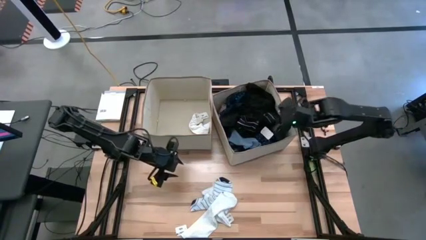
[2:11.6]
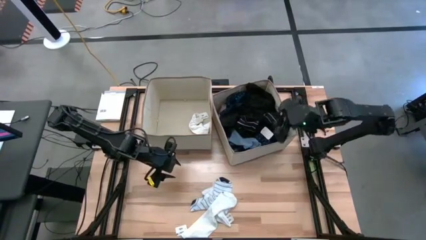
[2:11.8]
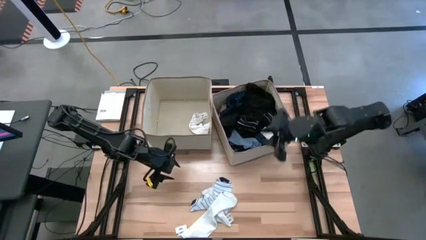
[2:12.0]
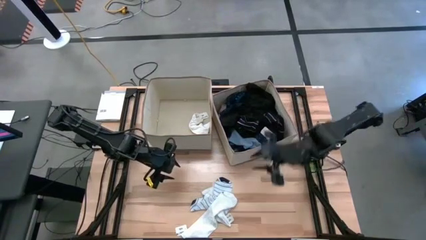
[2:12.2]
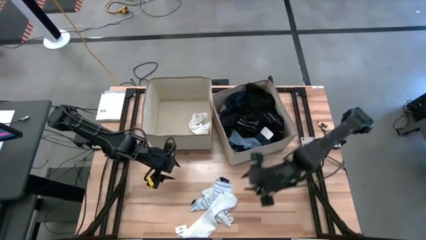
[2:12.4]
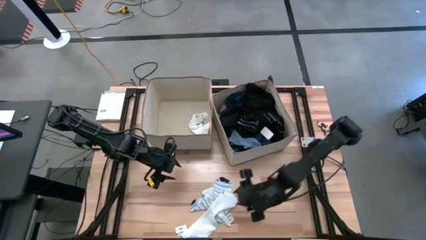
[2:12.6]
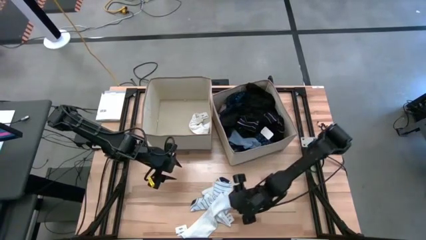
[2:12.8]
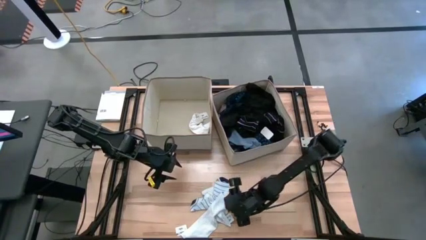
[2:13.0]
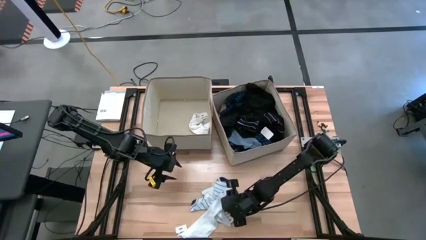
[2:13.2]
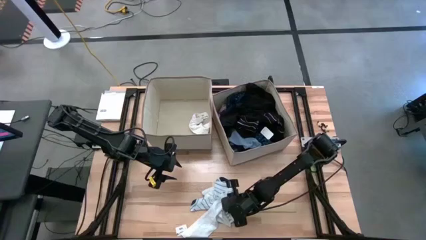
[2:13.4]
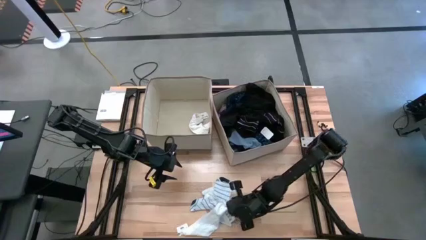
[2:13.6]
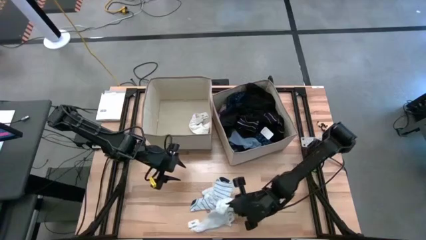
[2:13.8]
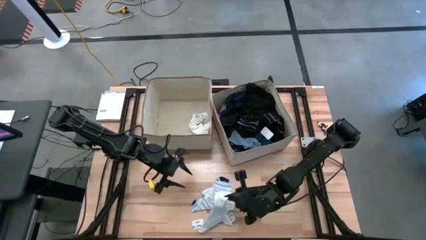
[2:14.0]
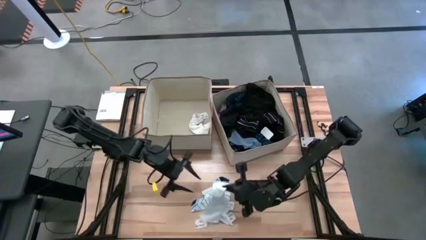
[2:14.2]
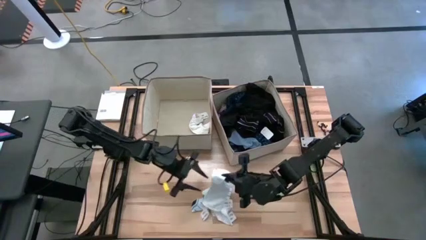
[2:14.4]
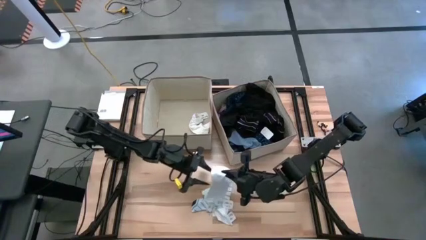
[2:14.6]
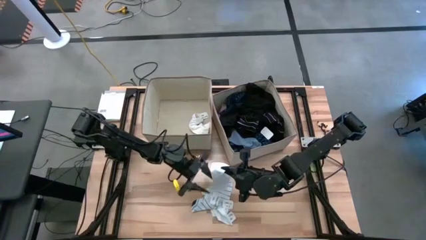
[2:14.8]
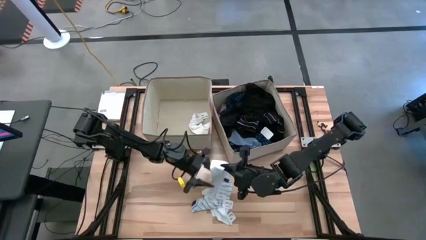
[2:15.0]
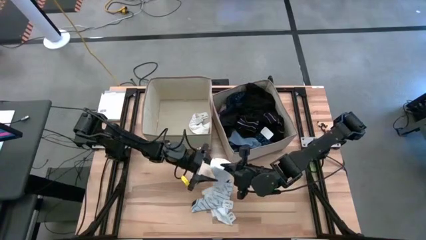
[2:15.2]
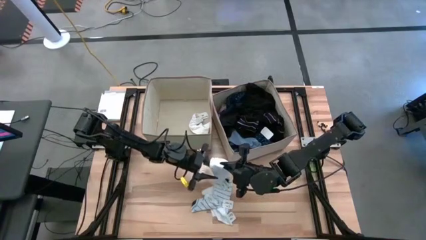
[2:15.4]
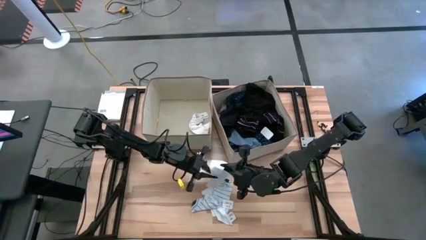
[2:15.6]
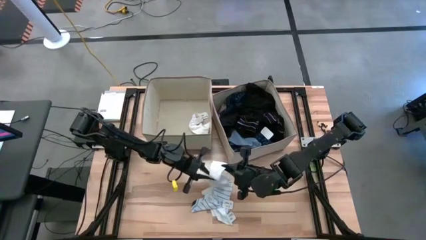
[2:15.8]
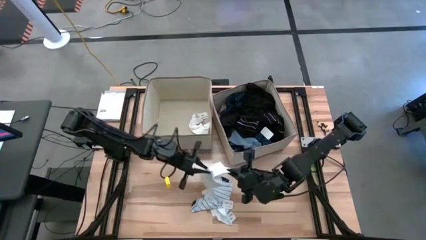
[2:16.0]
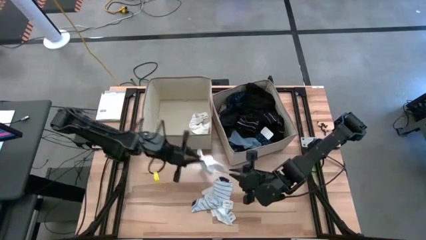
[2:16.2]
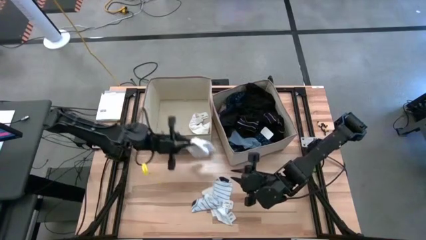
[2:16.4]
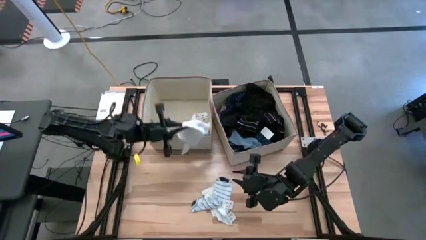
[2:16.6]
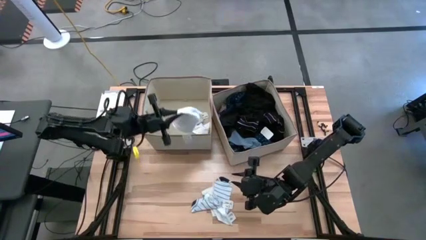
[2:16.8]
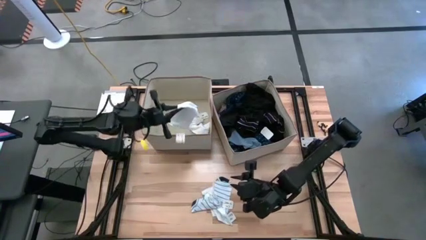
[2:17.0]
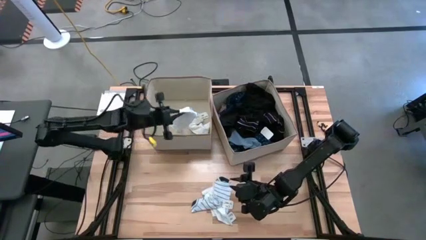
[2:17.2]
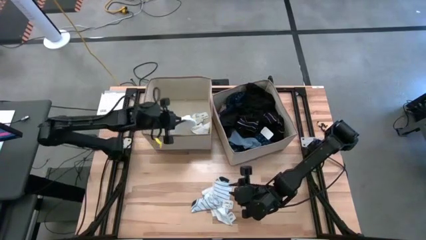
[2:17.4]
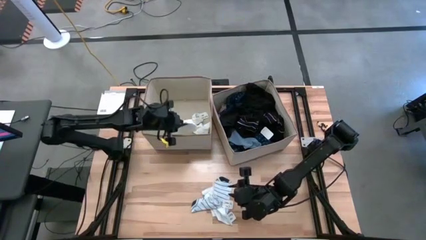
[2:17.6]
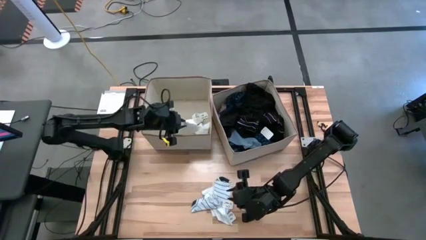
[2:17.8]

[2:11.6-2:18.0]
Task: Sort clothes
Put the top white sock into the left laundry organizer

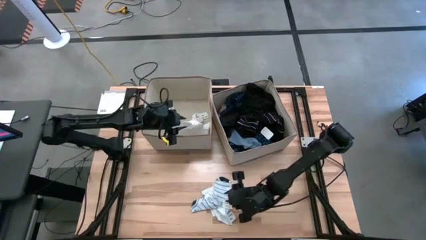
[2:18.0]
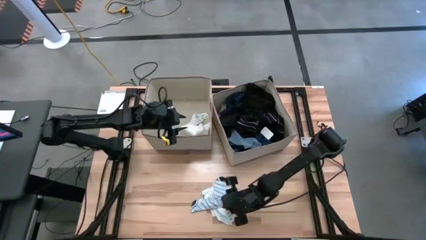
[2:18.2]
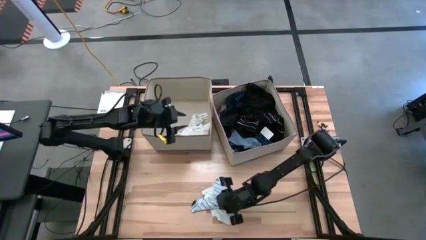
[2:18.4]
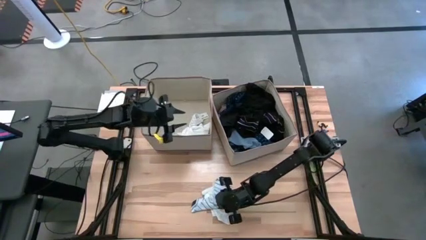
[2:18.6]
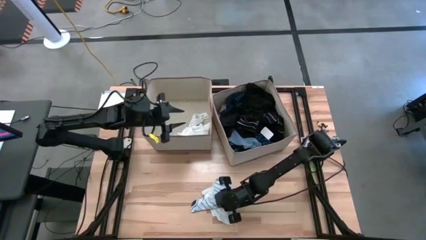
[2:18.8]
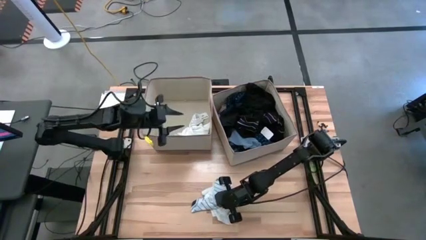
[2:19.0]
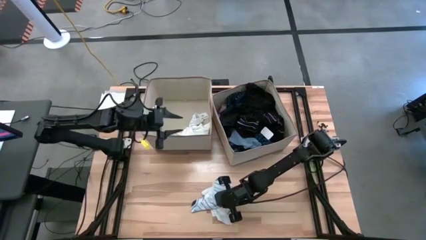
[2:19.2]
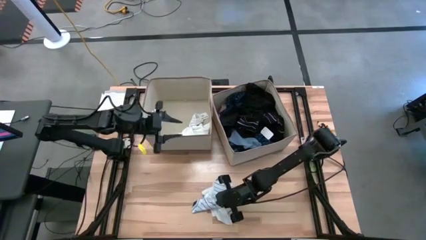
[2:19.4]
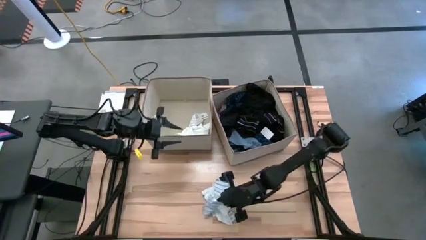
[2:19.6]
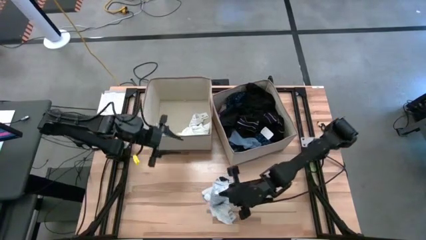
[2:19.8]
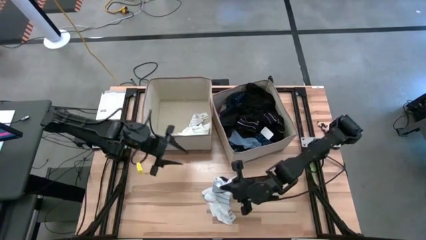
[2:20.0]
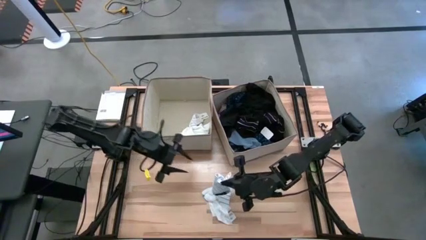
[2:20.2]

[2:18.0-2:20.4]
Put the right white and blue sock into the left laundry organizer

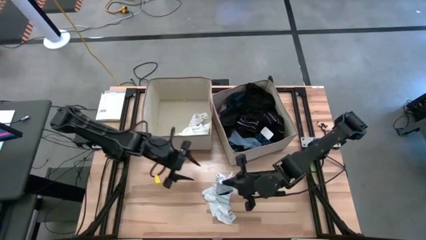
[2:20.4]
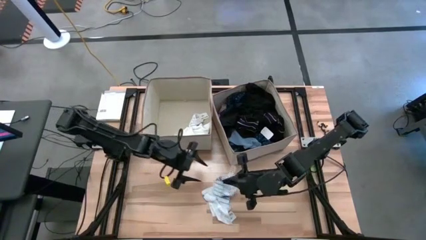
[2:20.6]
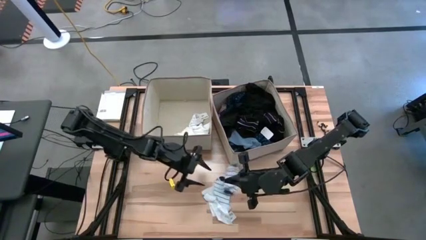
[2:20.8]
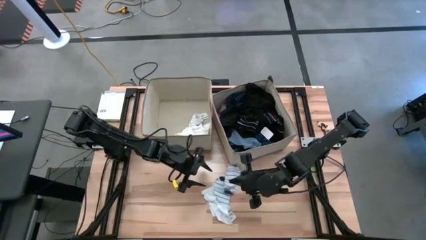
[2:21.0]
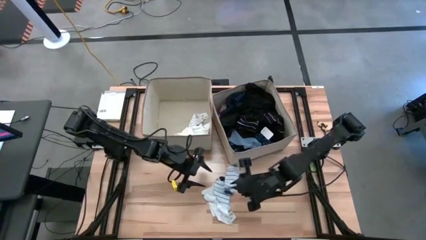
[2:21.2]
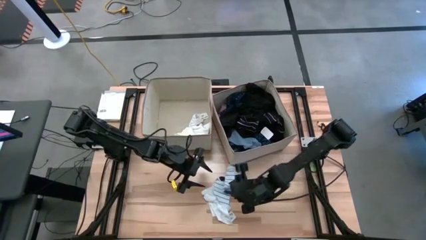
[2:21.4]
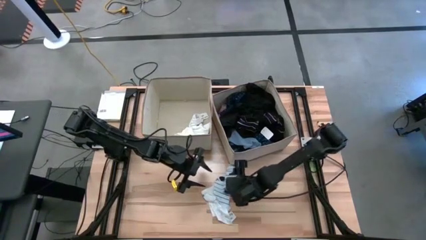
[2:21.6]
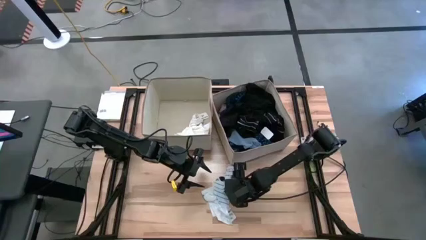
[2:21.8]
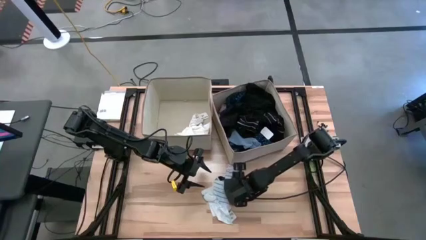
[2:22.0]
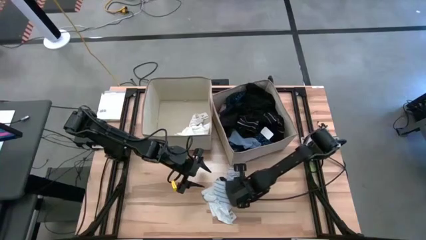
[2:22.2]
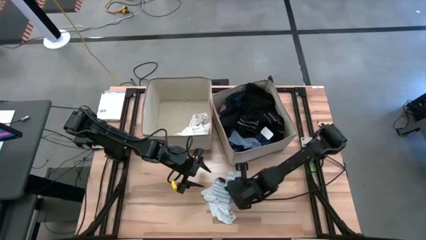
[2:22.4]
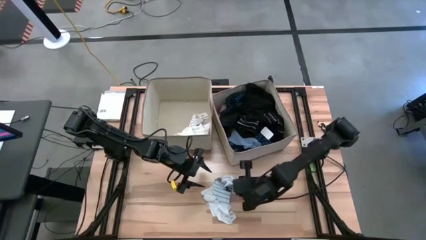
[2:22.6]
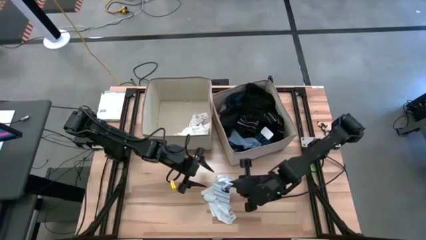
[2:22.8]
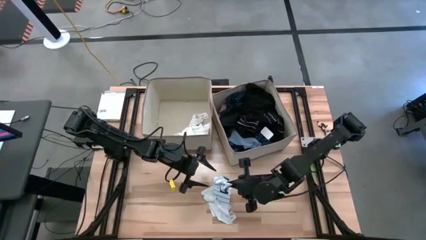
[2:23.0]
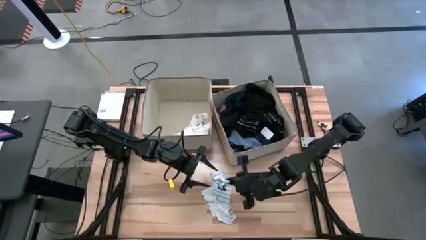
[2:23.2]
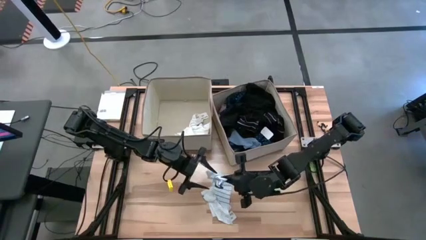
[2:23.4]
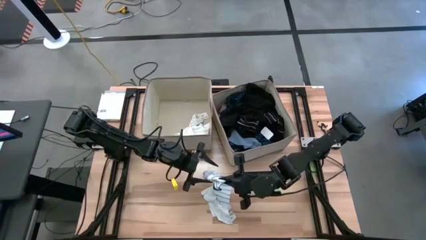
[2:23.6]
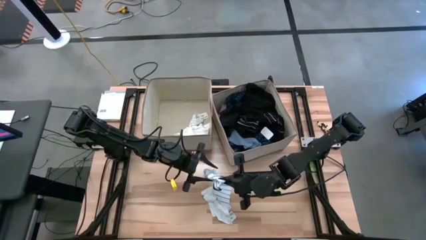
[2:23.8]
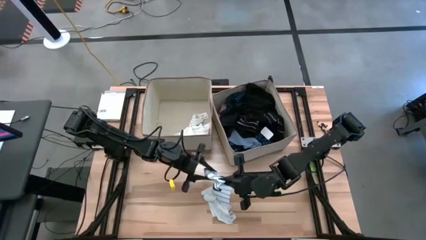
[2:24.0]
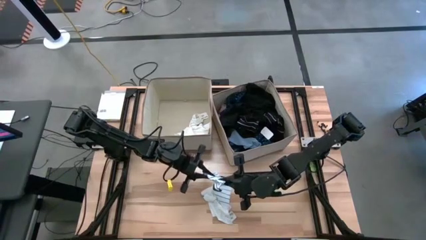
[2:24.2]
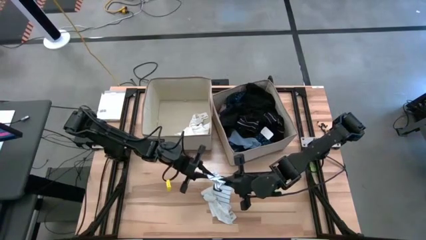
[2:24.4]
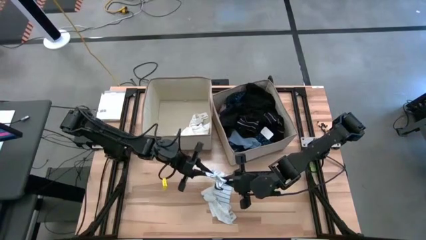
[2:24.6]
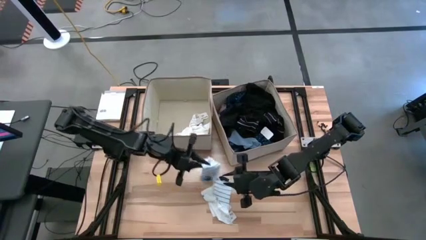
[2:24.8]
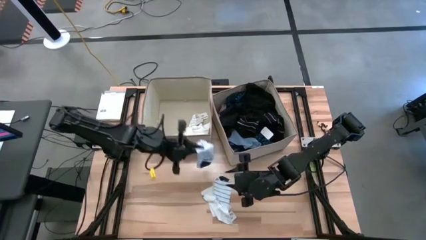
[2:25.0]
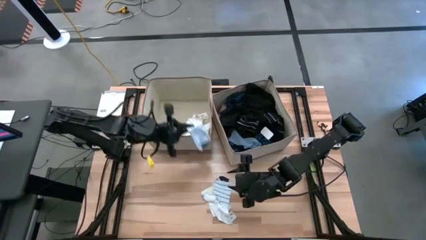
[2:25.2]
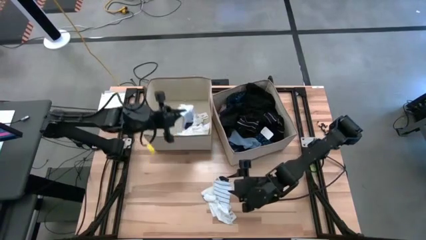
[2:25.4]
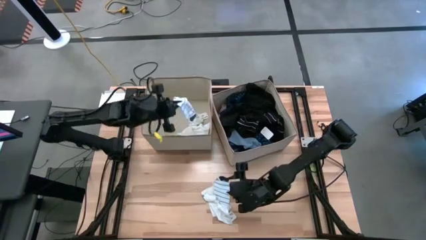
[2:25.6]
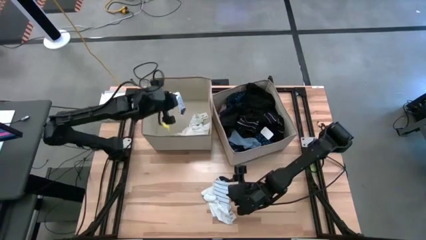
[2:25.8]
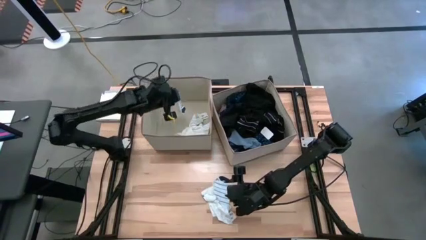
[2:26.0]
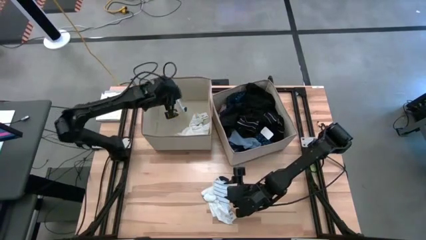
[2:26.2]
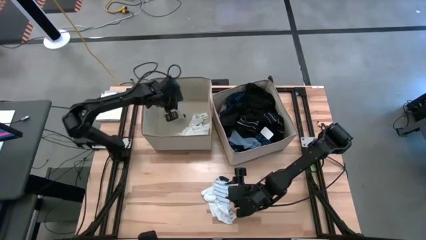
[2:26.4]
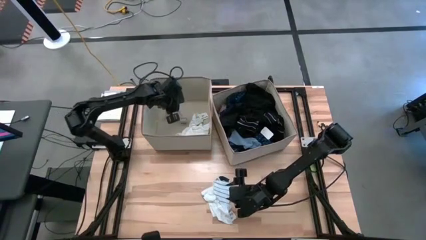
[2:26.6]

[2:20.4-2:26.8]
Put the right white and blue sock into the left laundry organizer

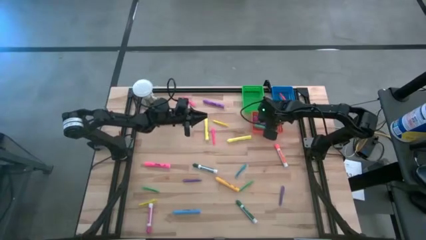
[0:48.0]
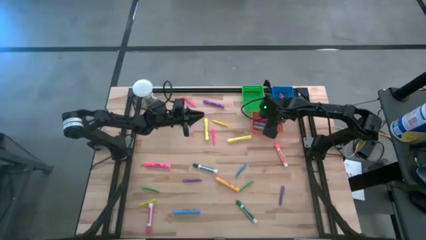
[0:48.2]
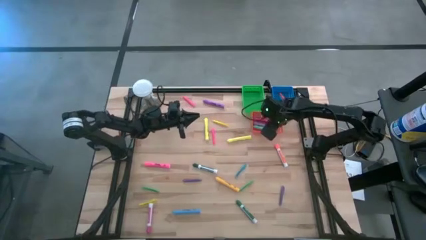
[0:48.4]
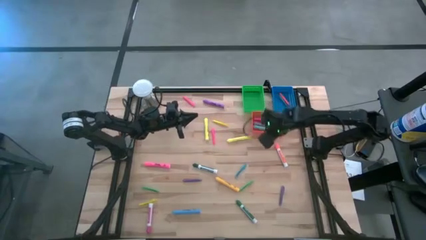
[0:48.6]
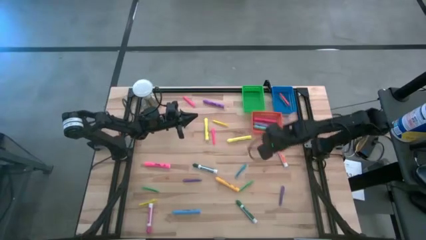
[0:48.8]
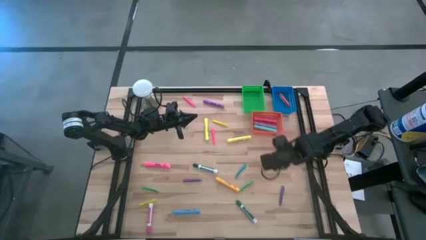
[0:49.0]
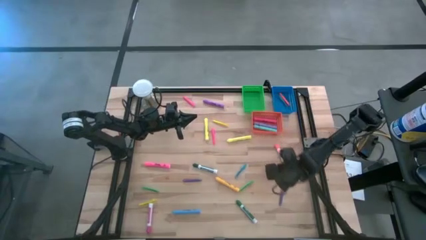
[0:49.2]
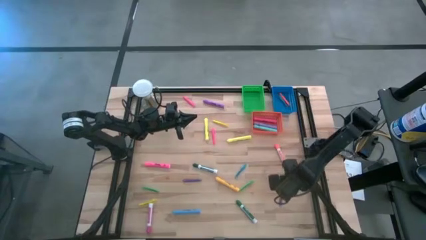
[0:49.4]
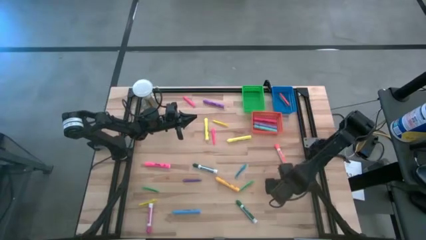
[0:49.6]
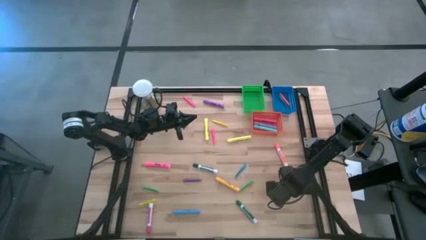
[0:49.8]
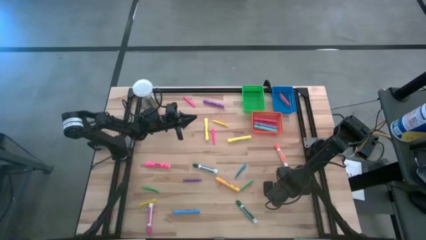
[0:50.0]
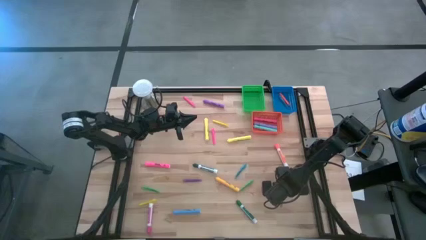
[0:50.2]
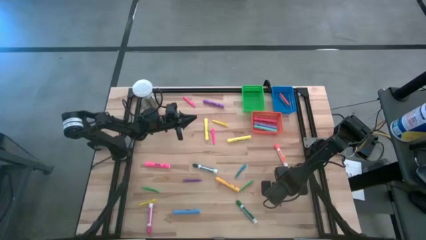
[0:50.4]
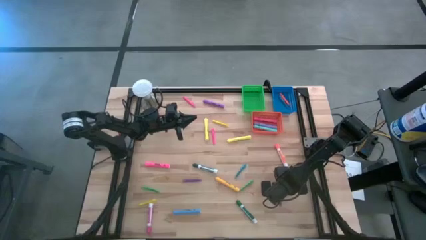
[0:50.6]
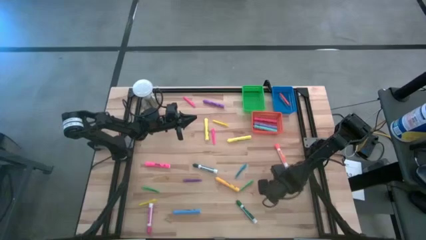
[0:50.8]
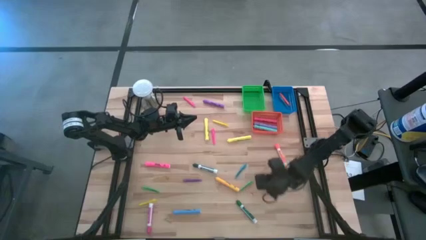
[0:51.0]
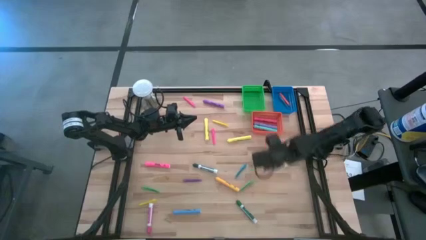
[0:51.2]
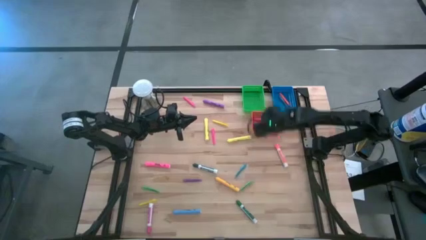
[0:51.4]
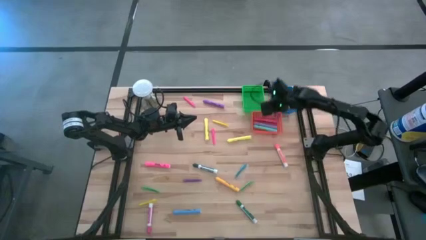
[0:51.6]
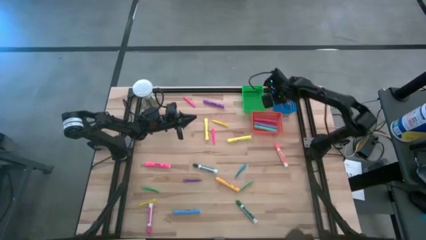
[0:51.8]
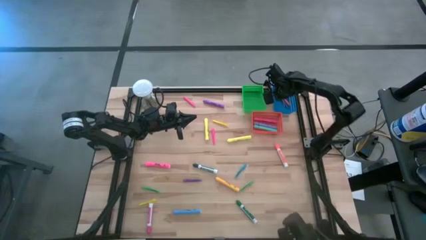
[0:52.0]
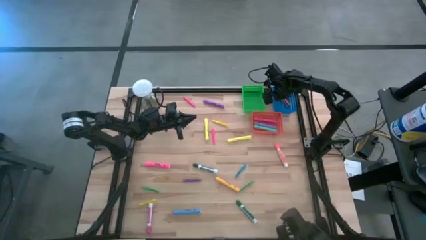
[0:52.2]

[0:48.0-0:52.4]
Task: Pick & Place Markers
Put the right violet pen into the blue bin
